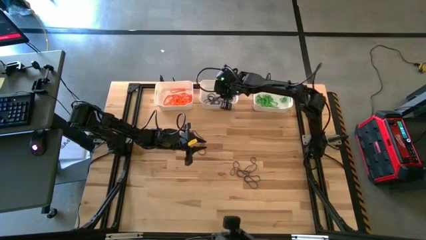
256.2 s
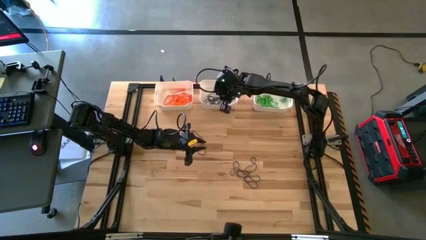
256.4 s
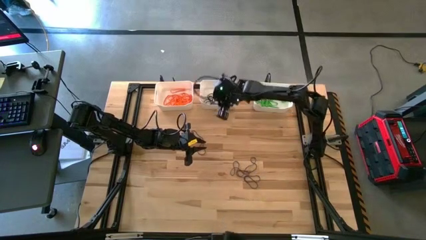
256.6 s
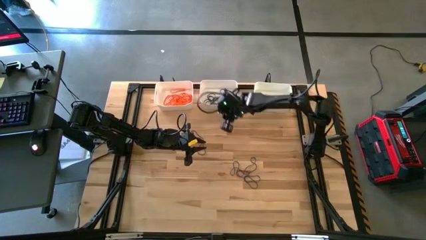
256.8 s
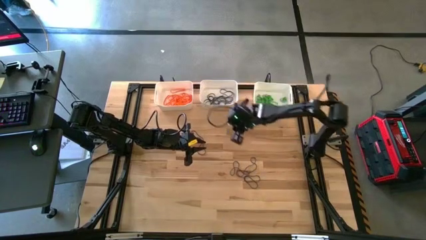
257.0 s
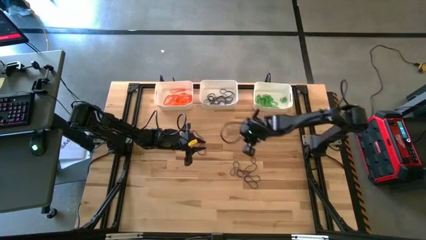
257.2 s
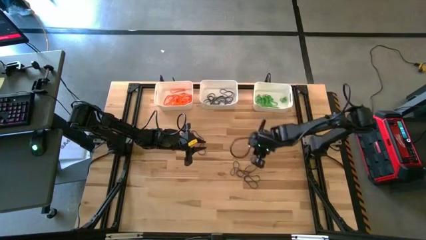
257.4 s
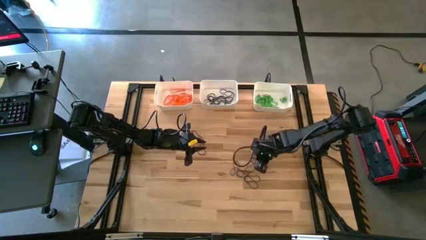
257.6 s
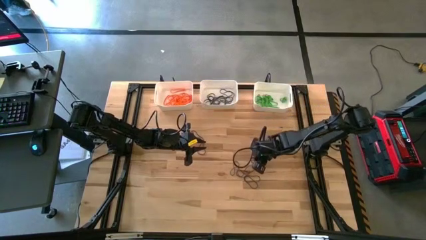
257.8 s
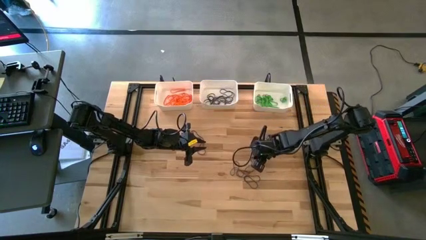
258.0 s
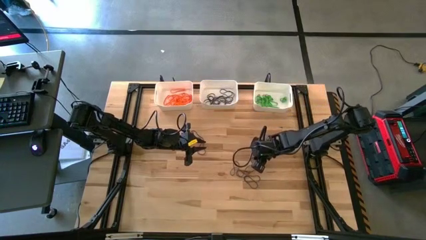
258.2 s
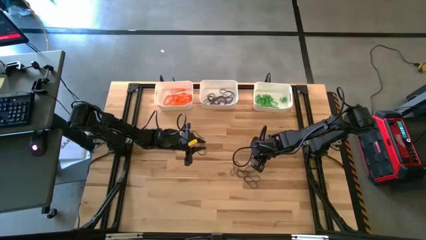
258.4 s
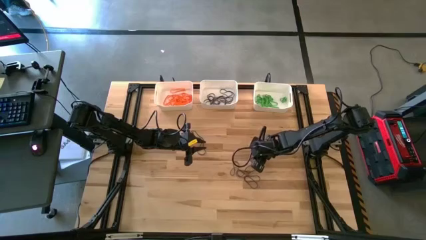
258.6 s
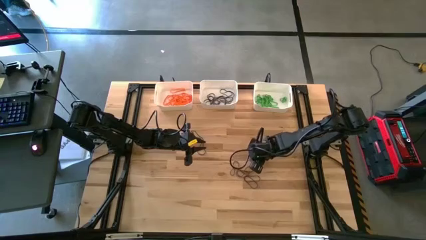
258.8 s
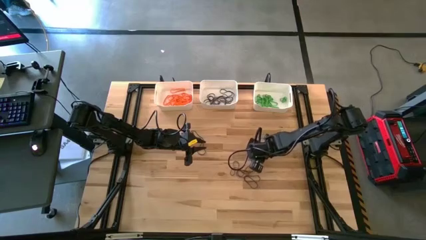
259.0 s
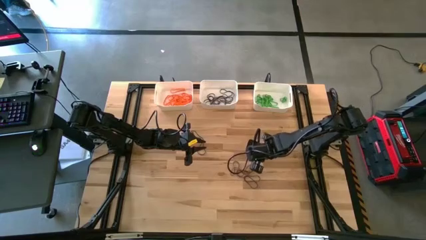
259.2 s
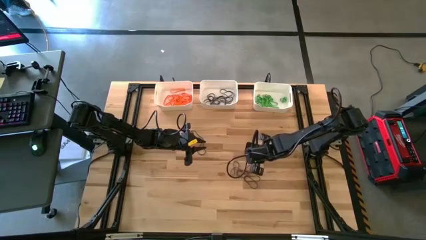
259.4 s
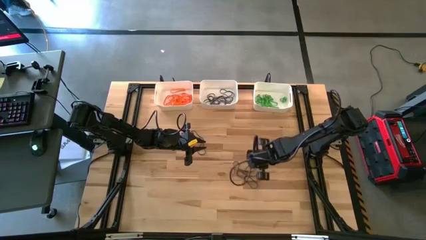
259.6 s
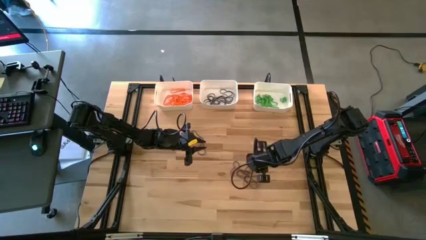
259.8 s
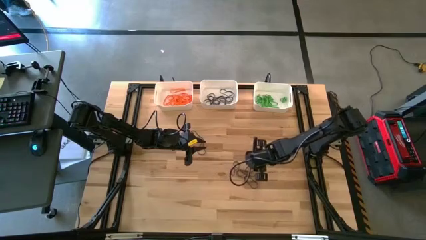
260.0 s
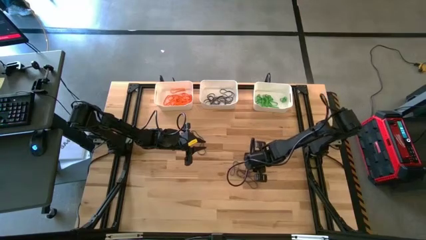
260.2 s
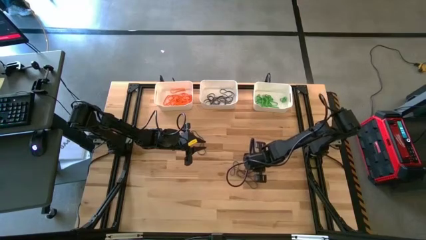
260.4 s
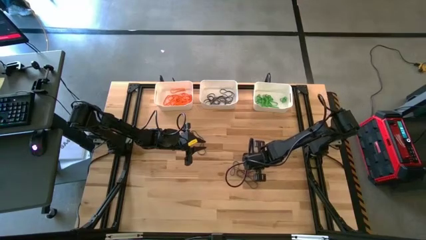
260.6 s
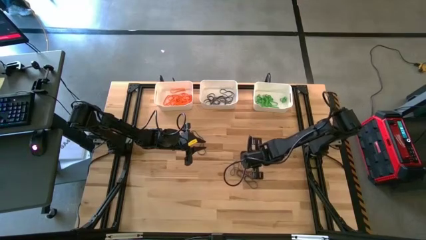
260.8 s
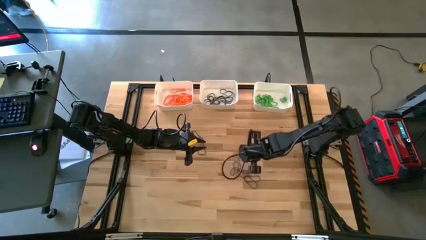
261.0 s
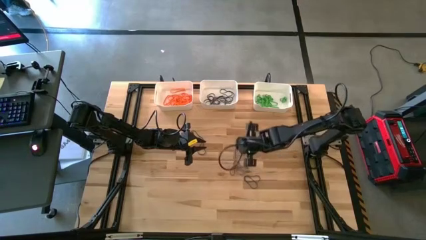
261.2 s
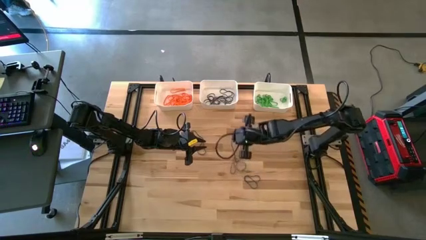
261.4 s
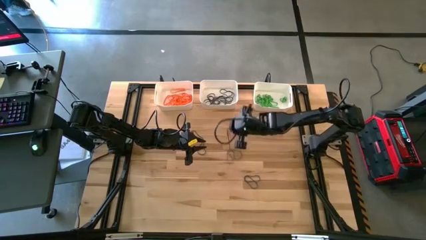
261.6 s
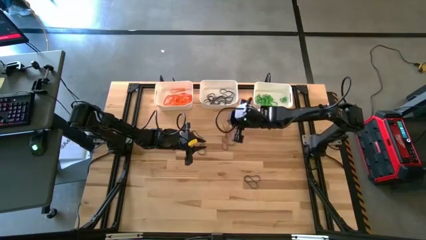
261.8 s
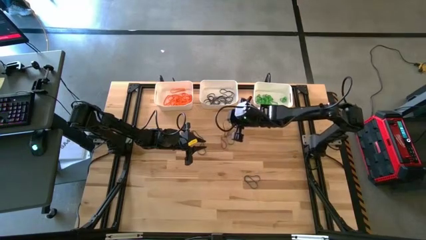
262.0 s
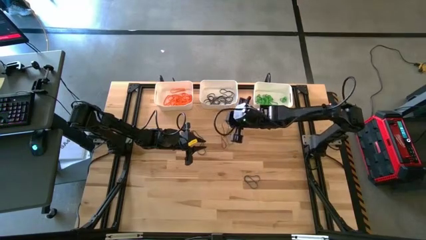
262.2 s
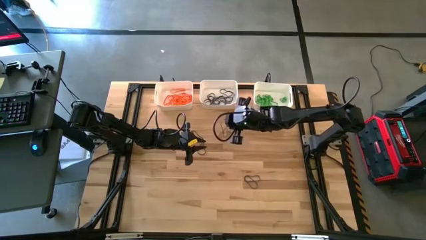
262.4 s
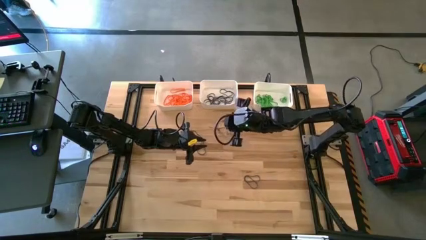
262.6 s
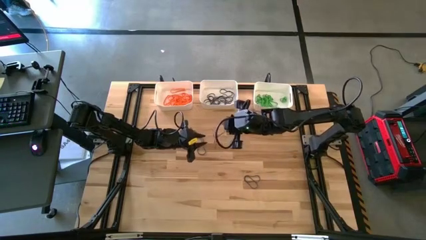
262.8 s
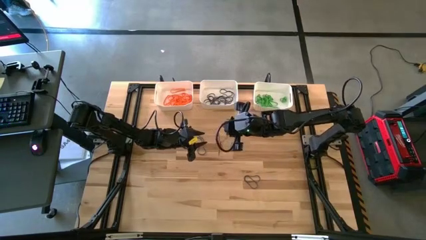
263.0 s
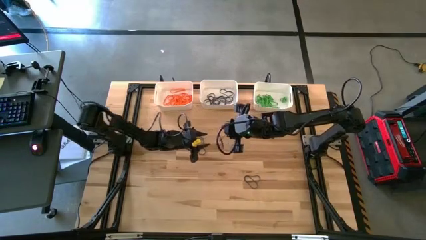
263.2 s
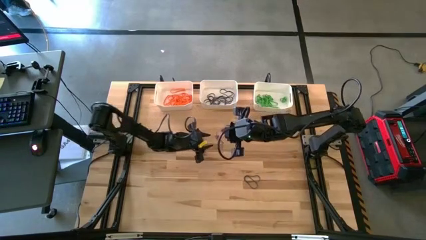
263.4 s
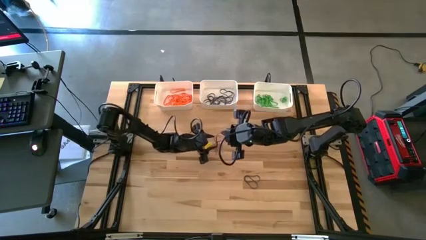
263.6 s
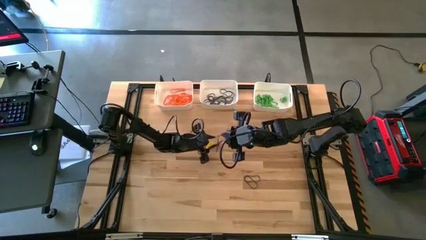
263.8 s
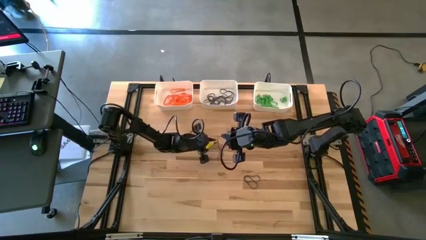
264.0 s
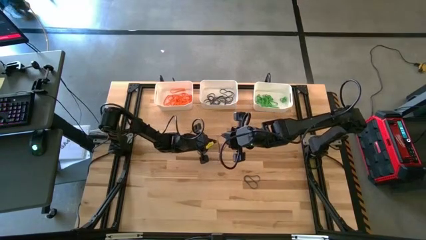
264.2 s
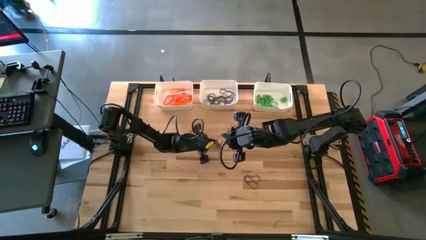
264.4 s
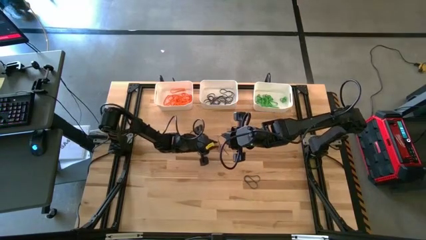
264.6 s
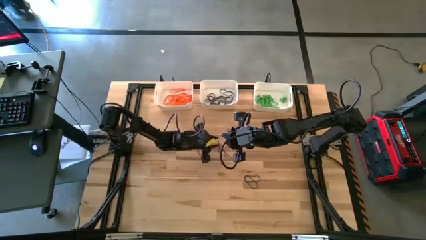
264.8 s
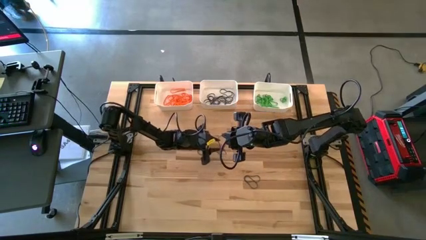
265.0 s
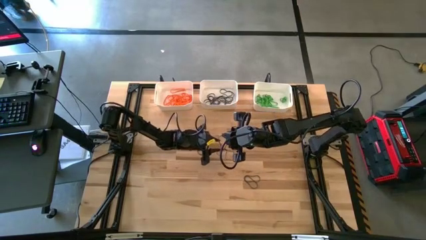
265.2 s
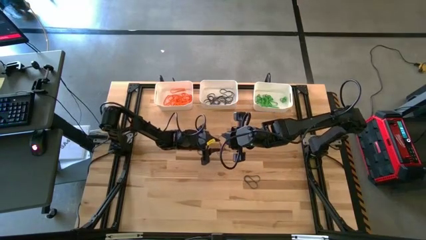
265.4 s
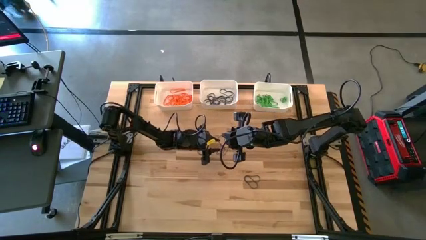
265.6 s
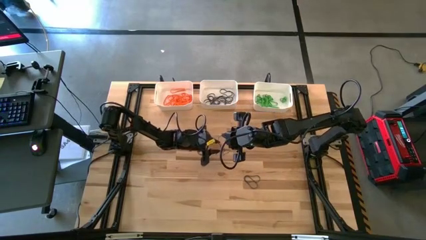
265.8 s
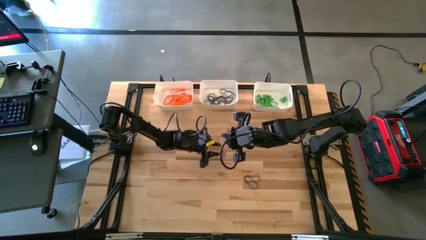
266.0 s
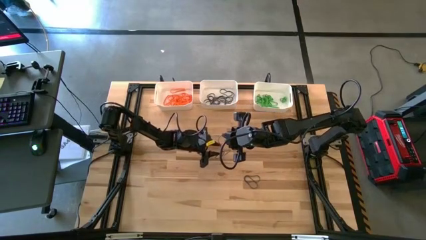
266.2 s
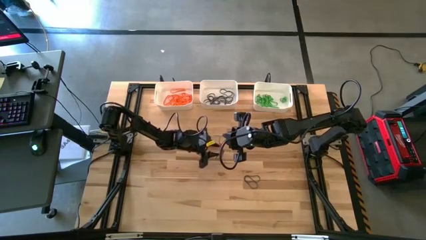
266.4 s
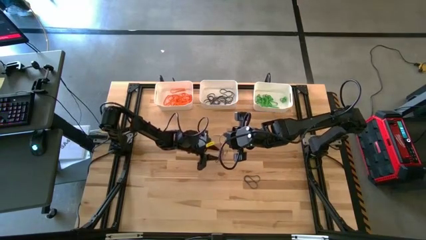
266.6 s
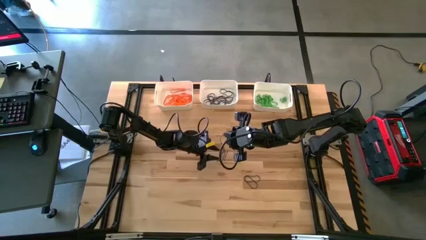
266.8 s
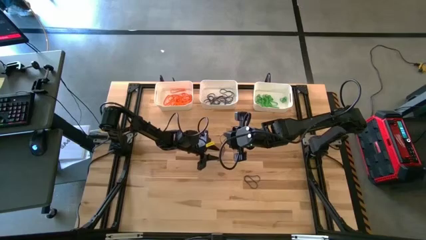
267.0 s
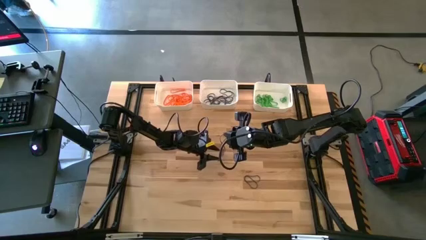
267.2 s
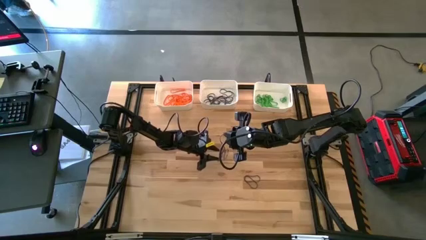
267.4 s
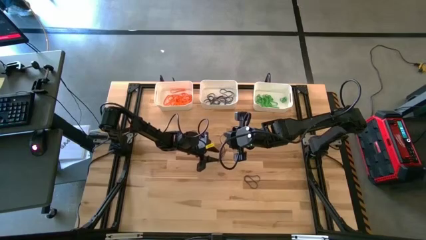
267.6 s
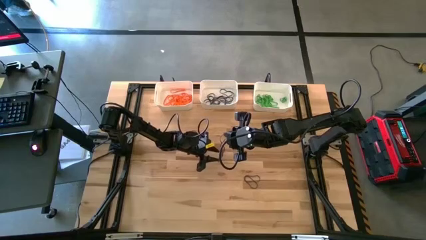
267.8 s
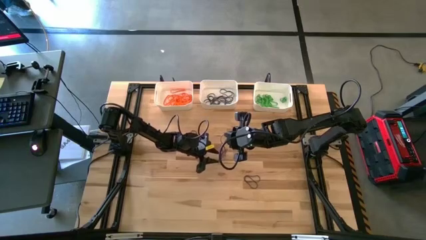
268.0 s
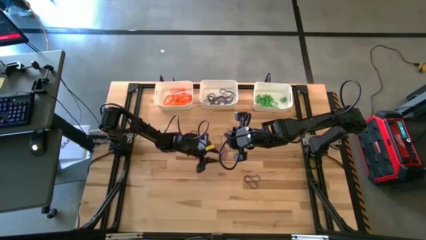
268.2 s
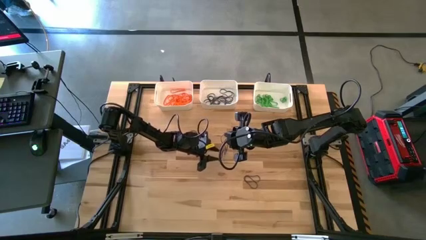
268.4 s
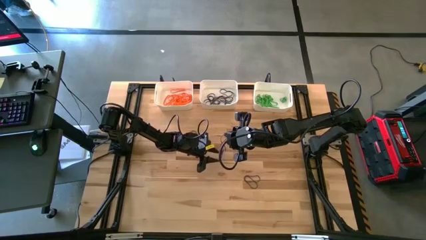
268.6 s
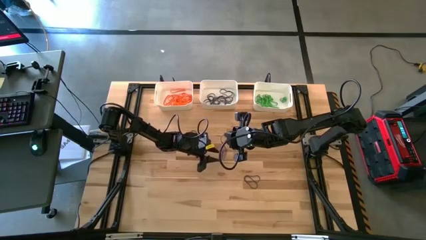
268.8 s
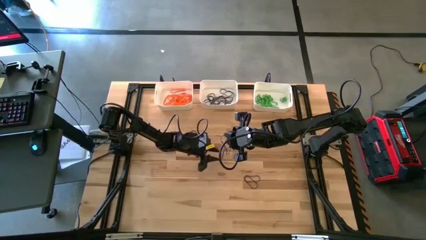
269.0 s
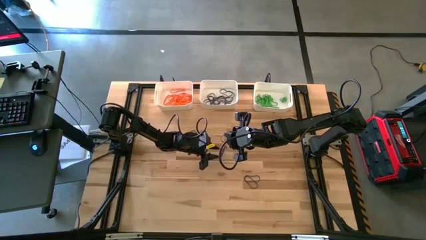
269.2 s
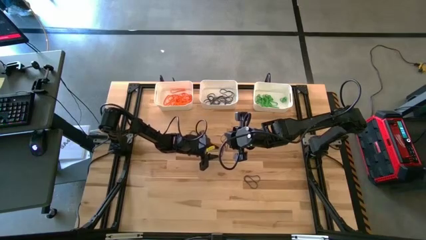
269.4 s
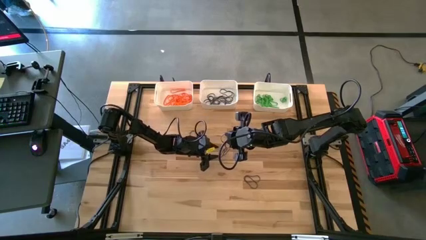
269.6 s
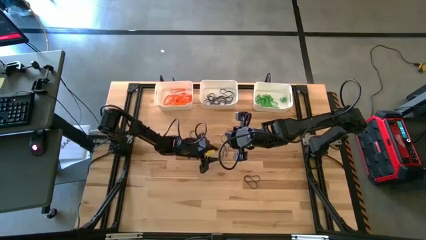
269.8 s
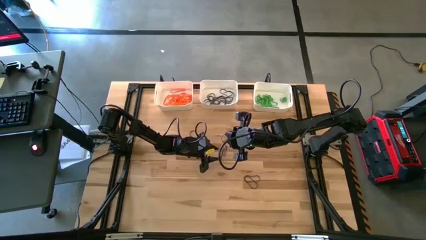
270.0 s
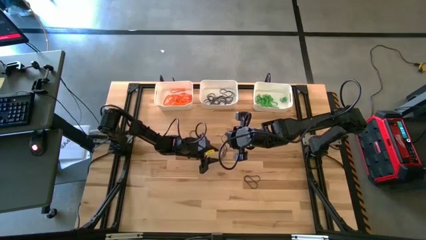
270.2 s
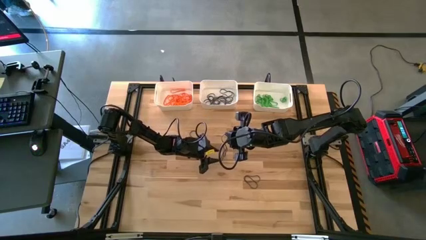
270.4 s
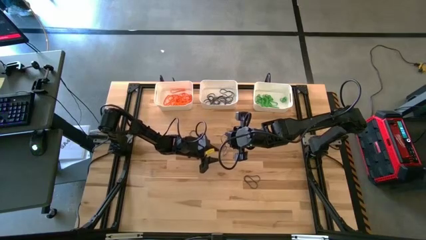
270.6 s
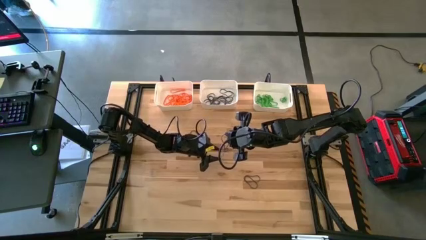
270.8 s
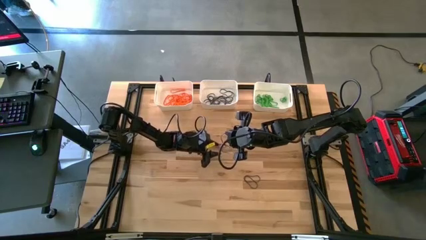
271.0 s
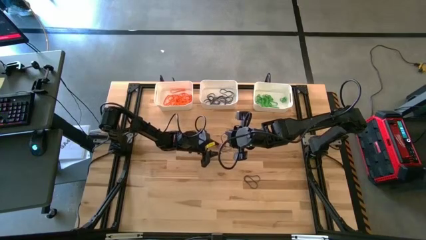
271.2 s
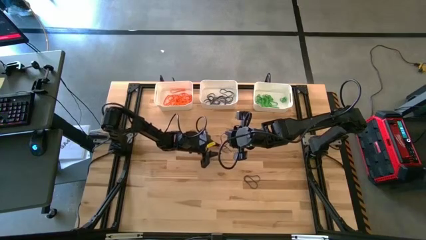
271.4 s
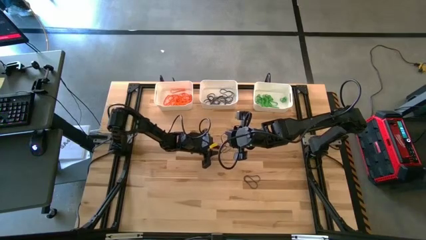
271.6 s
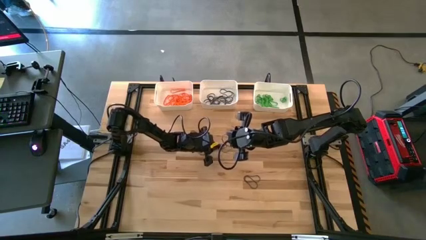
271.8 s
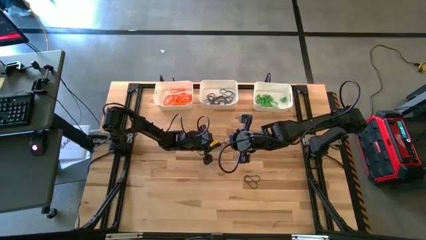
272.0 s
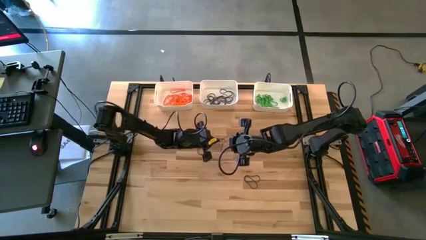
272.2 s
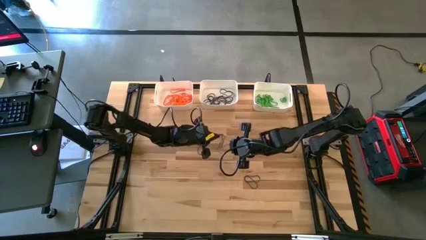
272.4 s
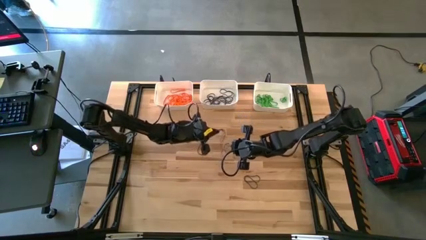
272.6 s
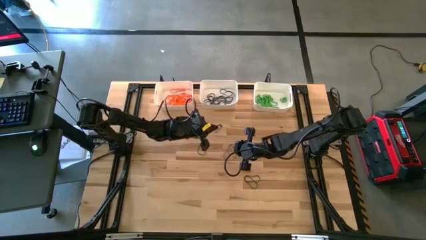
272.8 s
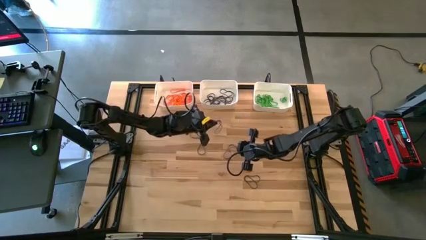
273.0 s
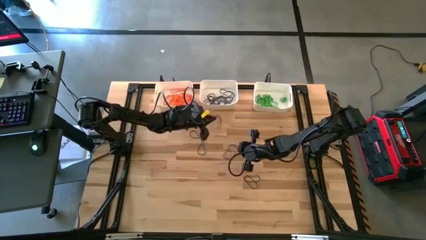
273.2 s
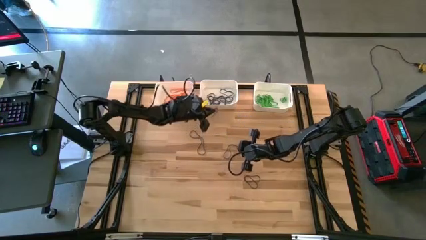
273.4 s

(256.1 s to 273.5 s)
Task: Sort rubber bands into baskets
Put the purple rubber band into the middle white bin

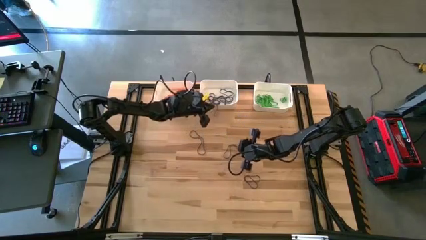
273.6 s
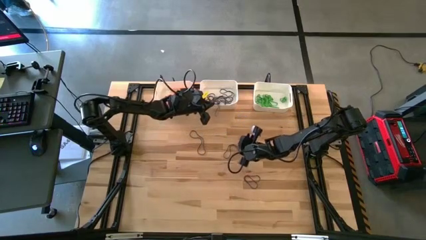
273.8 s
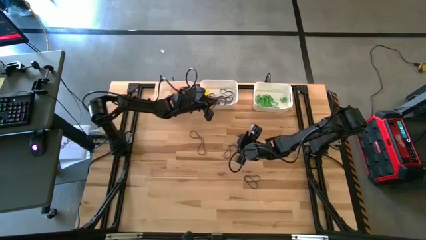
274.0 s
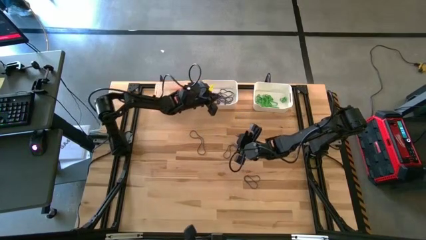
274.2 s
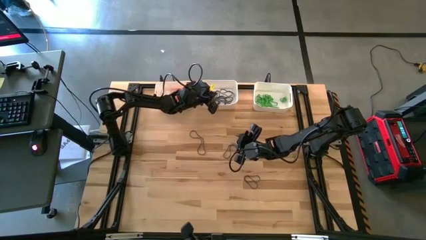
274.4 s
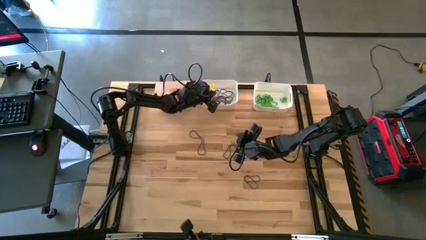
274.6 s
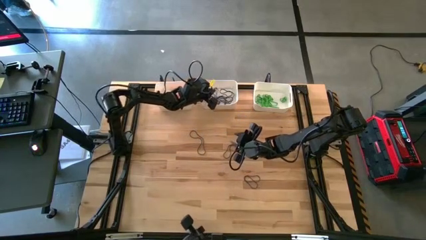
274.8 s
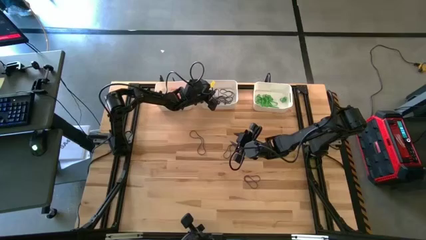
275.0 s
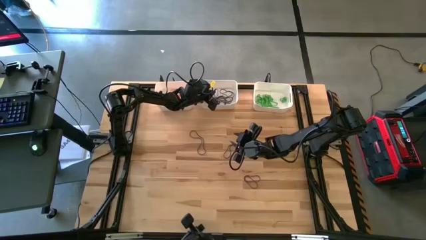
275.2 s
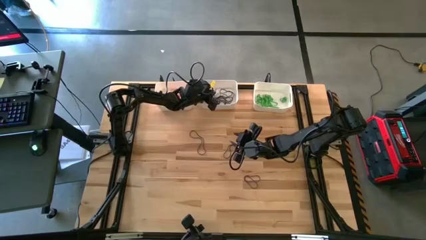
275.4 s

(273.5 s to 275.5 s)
Put the purple rubber band into the middle white bin
